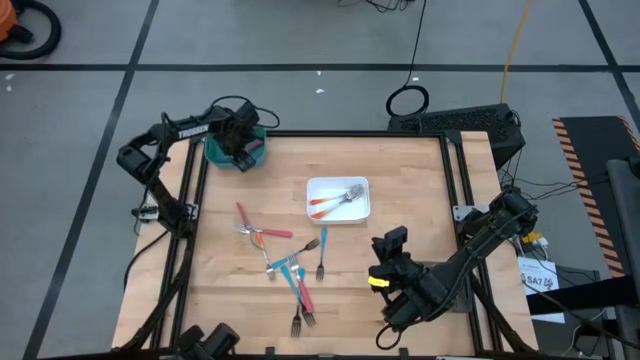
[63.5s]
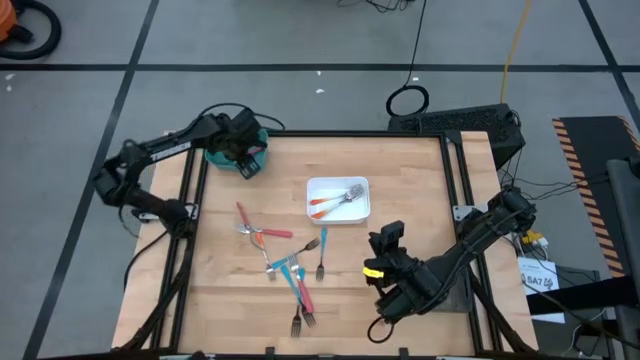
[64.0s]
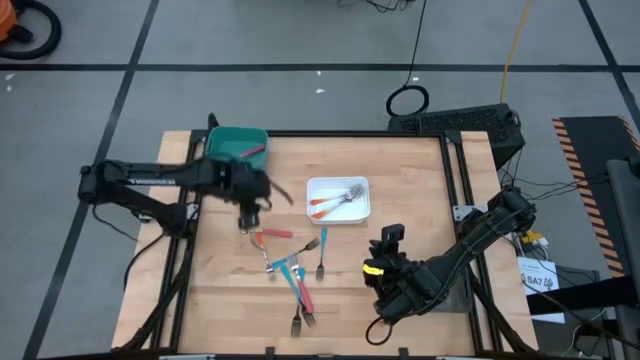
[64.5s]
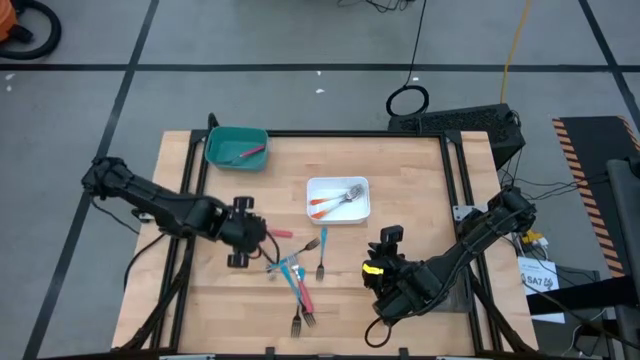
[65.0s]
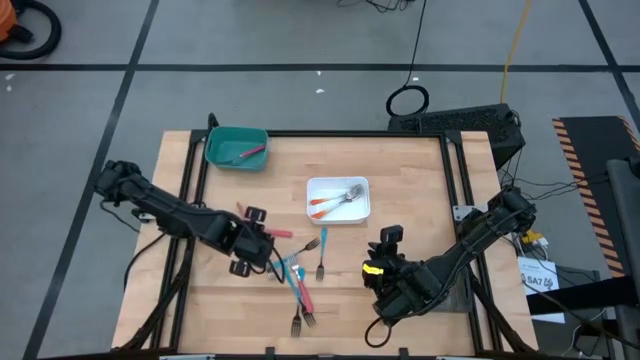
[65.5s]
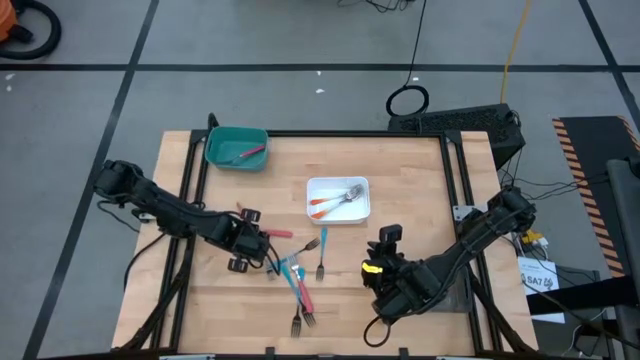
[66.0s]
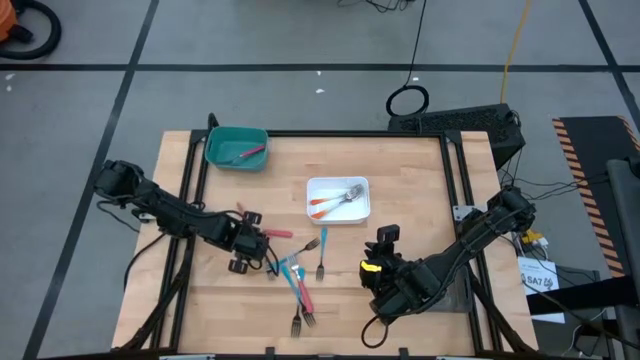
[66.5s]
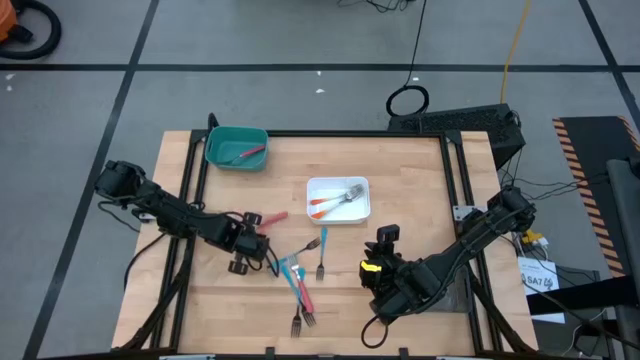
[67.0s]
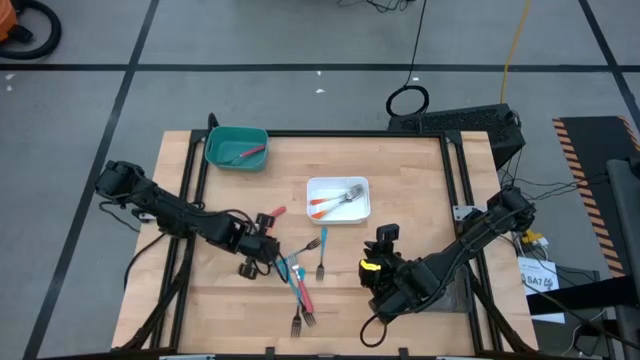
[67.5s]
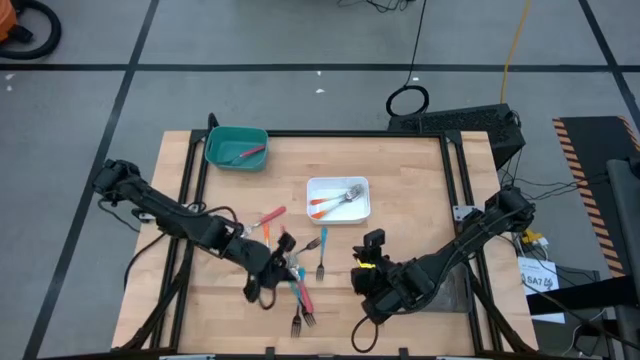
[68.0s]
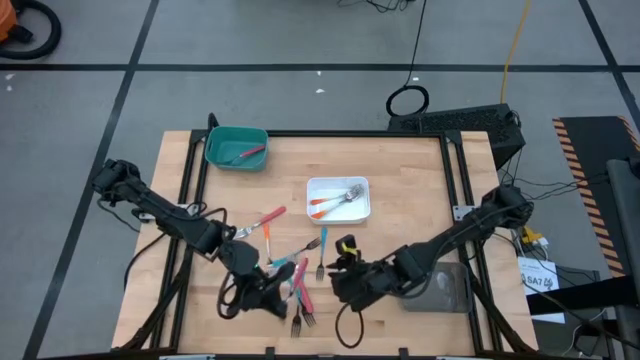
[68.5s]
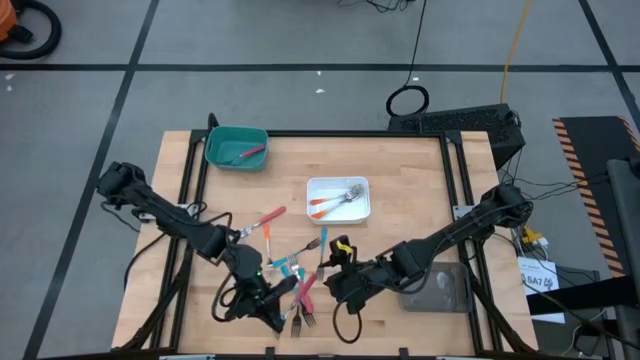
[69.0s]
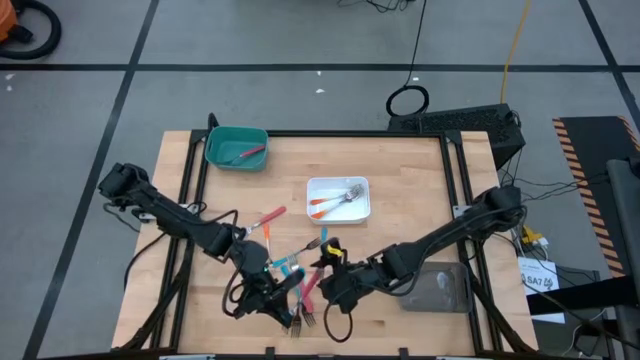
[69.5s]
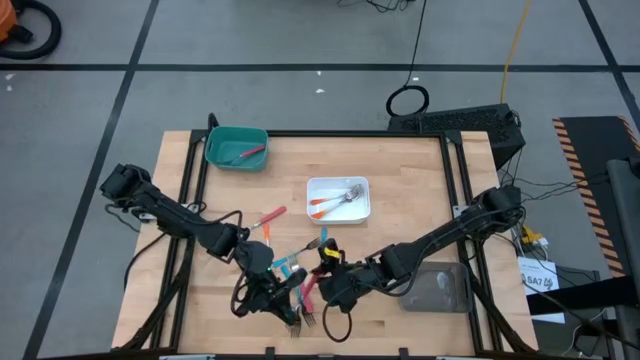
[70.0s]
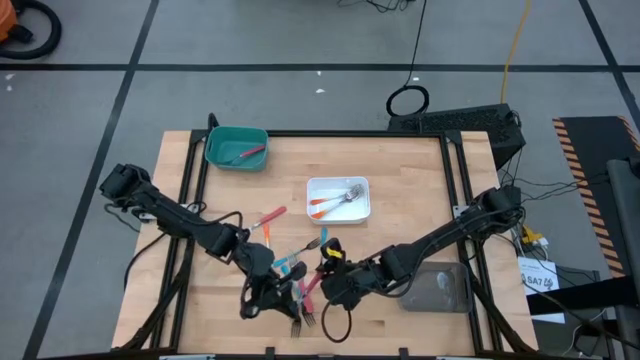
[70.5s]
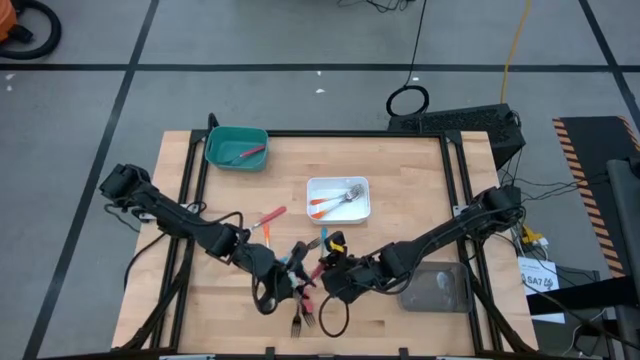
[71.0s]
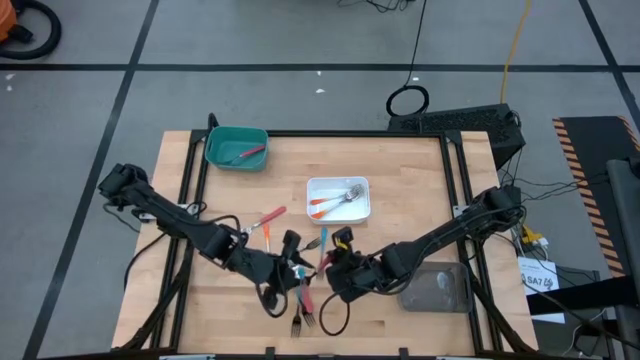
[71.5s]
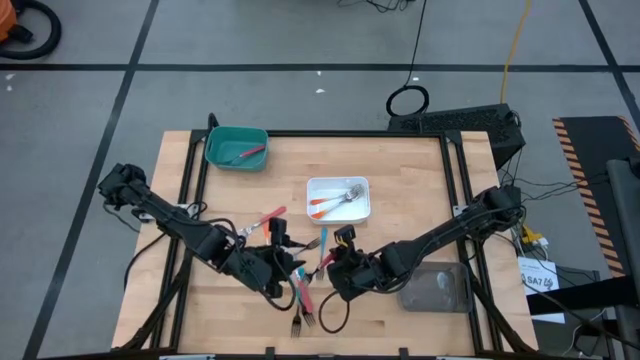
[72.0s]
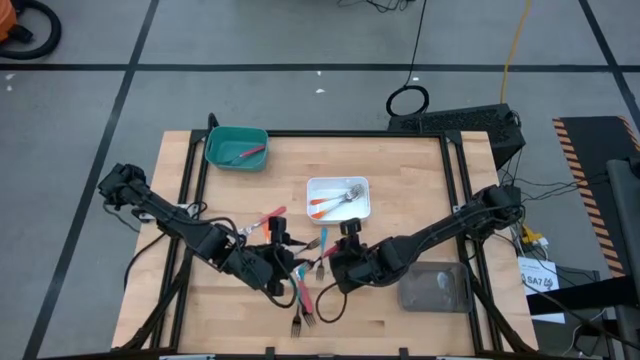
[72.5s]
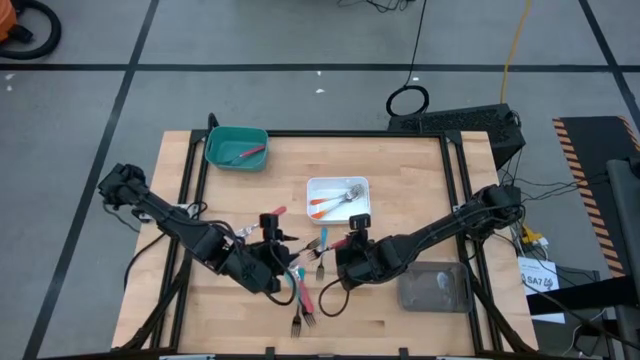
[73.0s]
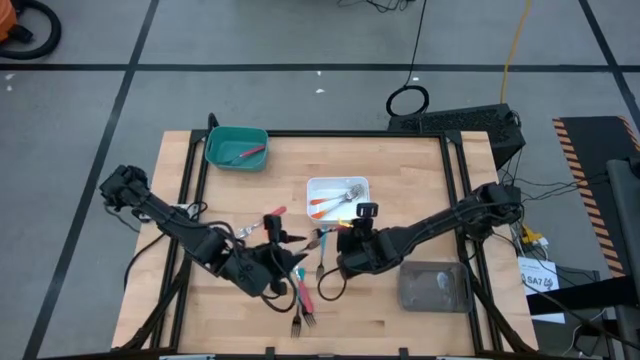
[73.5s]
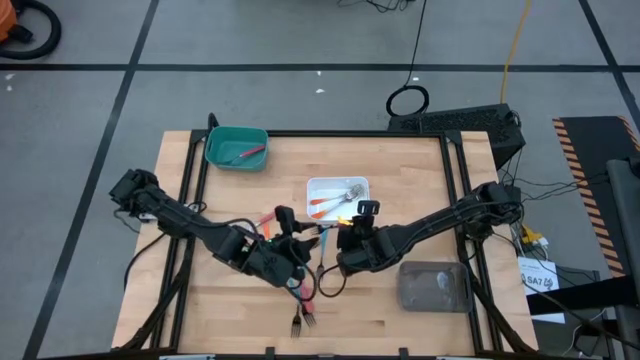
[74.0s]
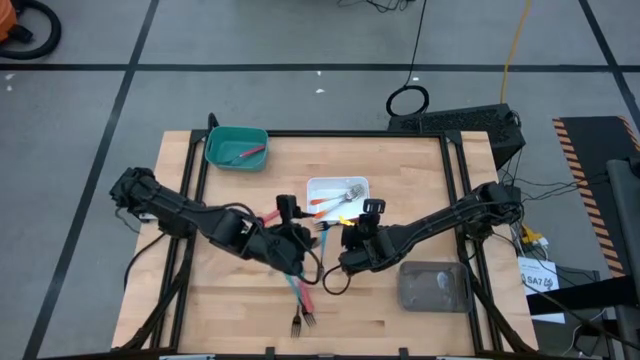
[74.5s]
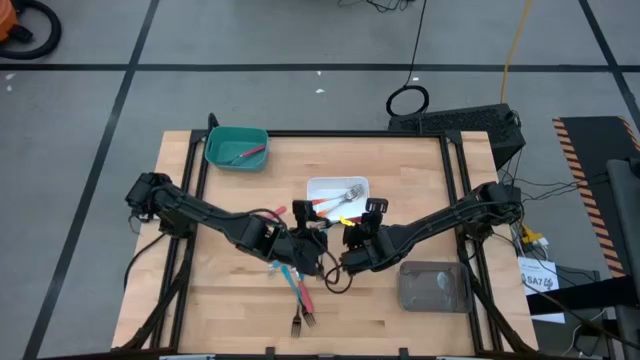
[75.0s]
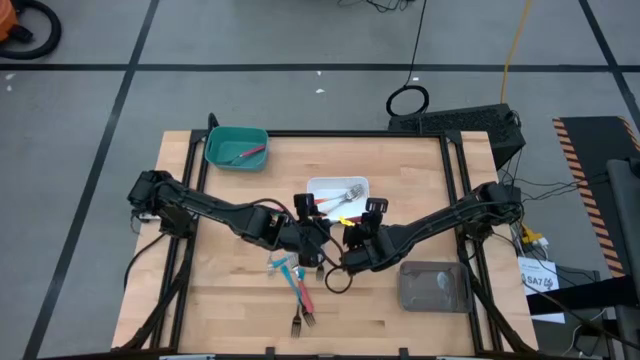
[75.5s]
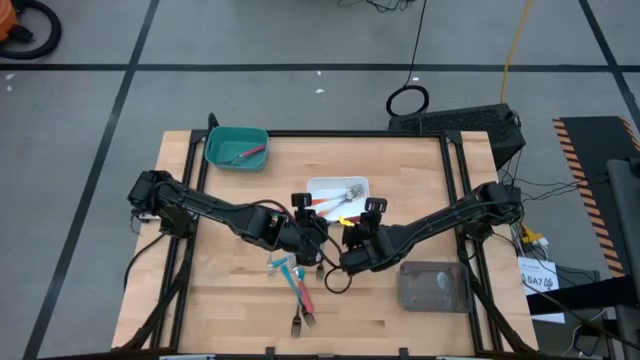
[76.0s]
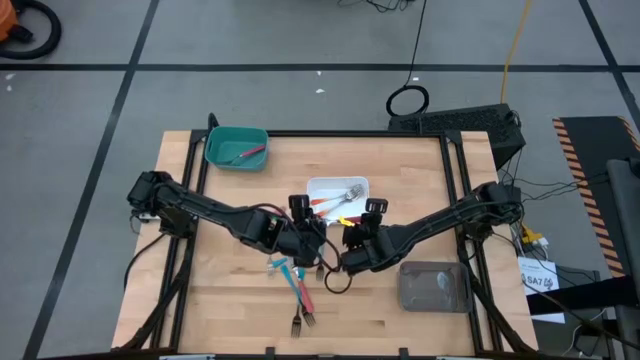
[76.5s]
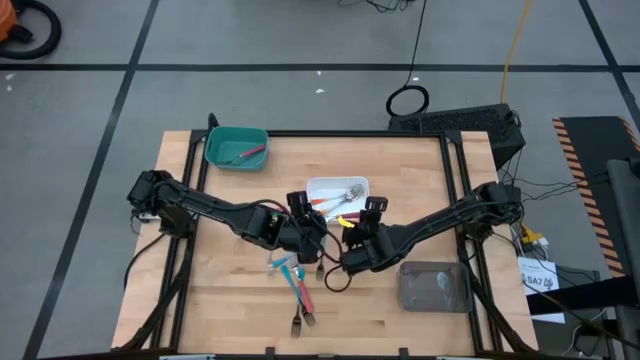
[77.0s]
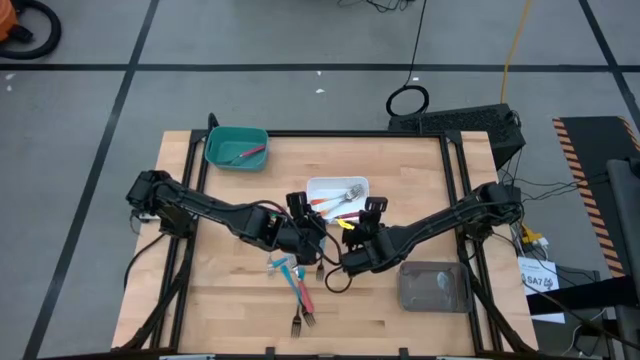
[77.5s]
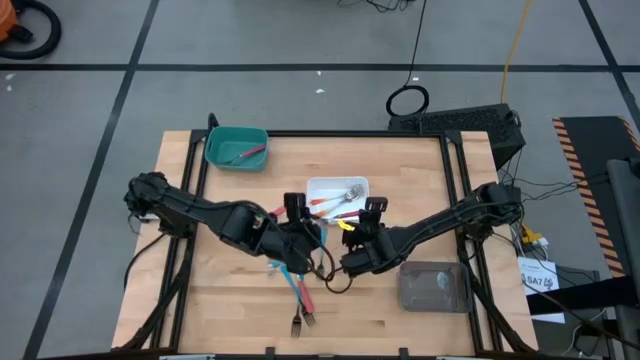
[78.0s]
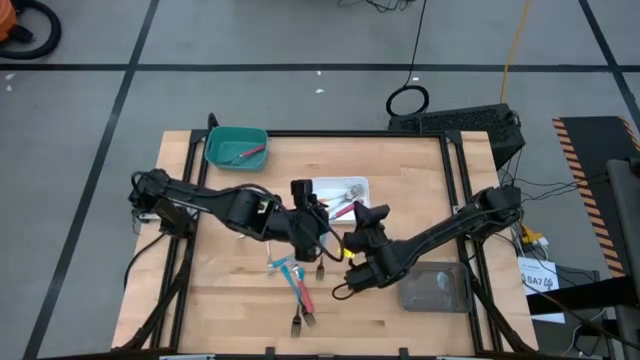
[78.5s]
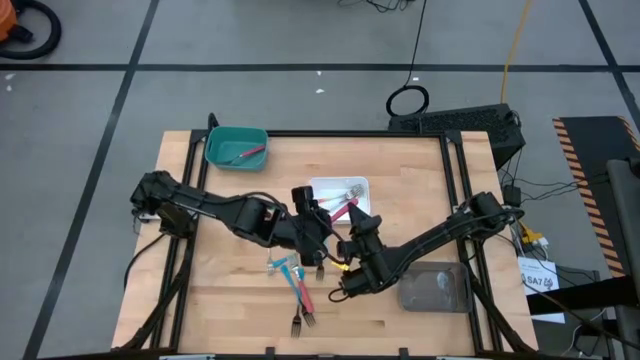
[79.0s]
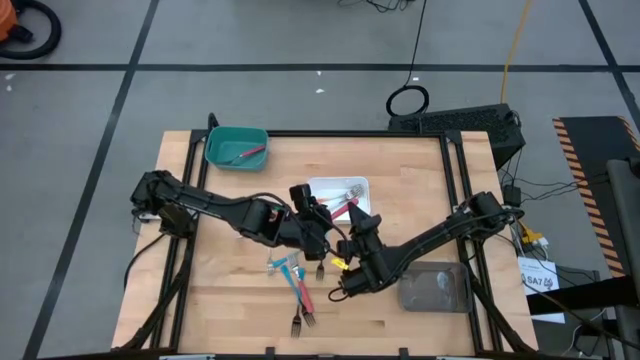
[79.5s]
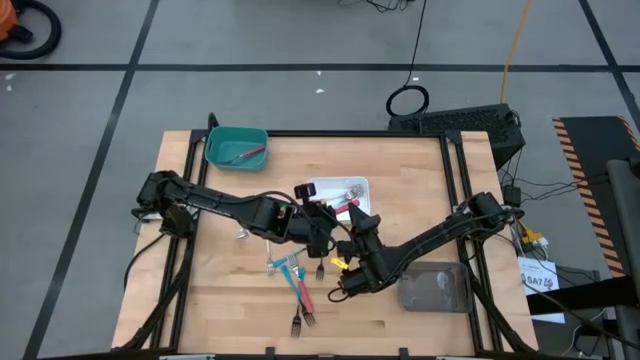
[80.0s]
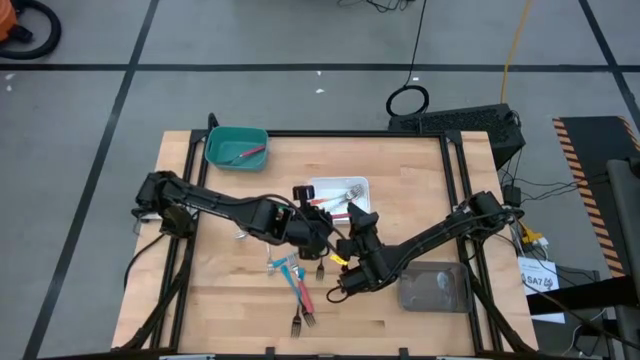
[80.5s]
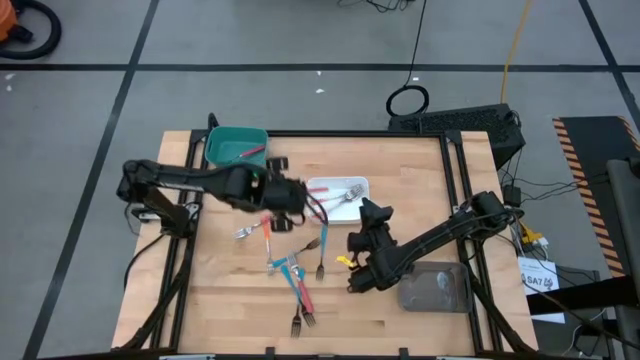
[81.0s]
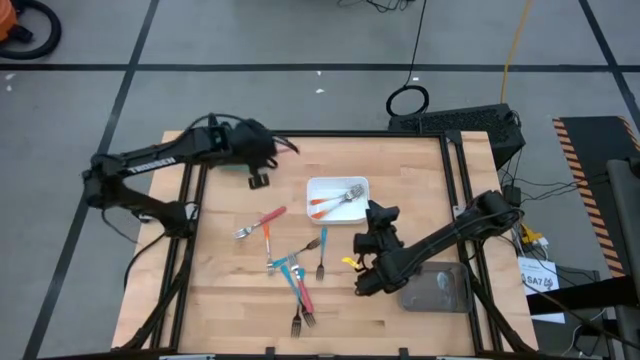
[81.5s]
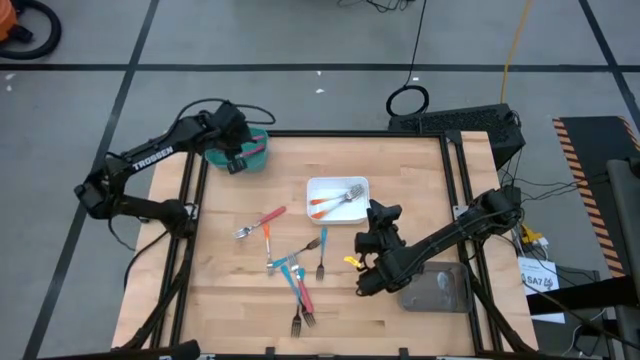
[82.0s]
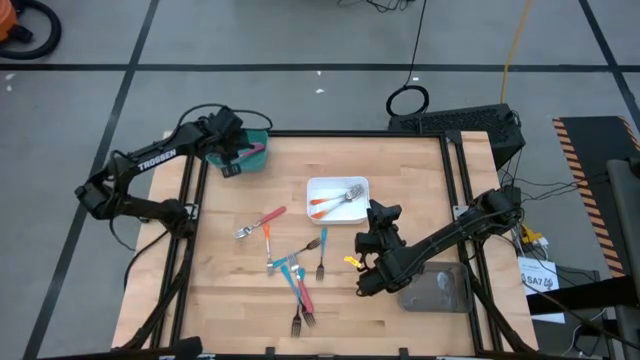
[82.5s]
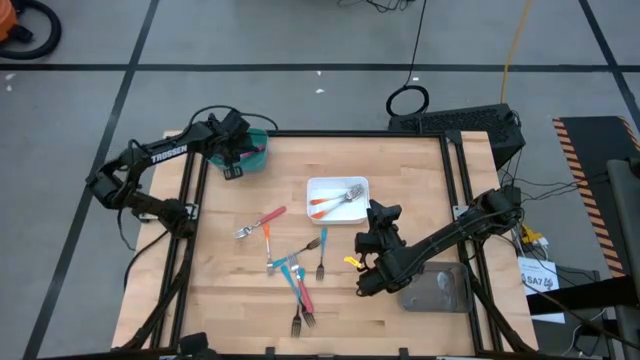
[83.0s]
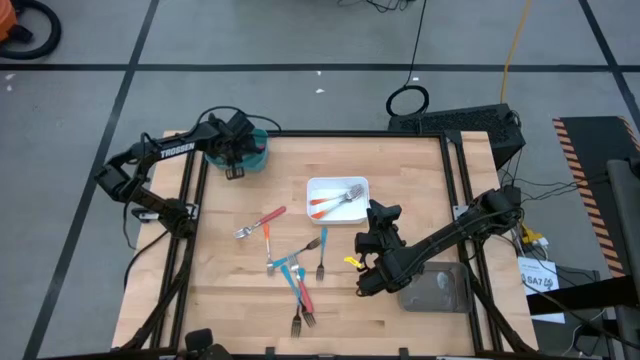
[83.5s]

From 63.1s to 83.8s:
Task: Sort silverware by color (type)
Put the pink fork into the blue bin

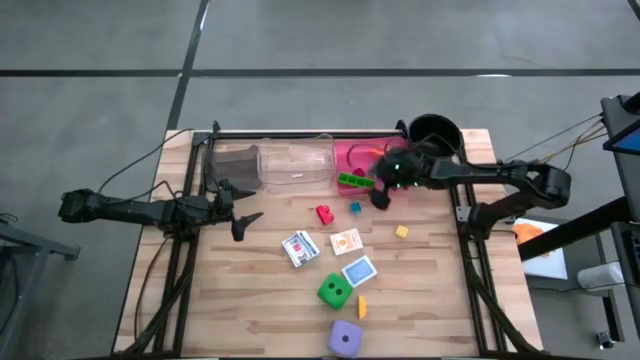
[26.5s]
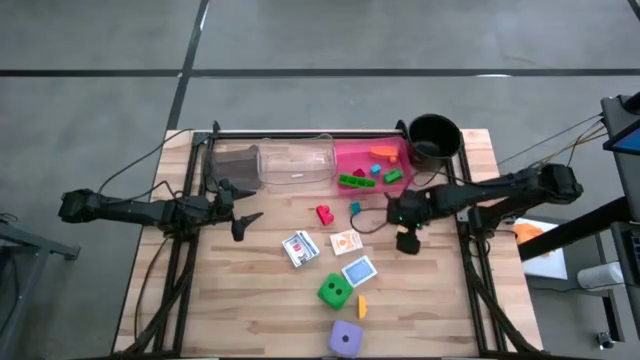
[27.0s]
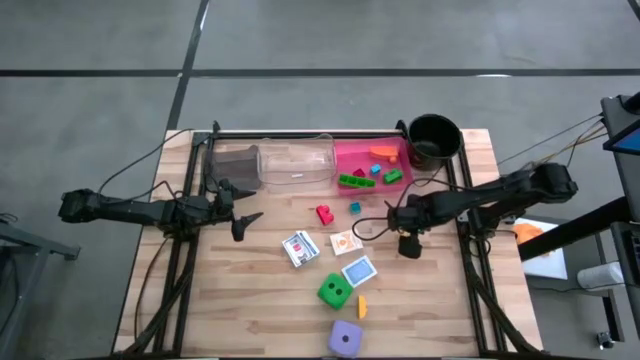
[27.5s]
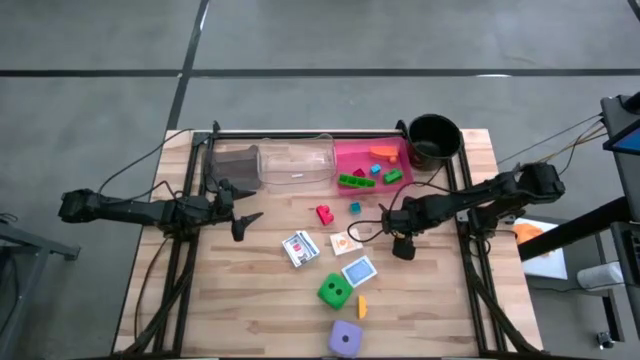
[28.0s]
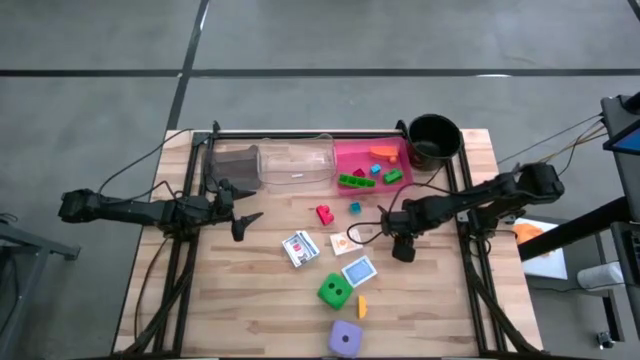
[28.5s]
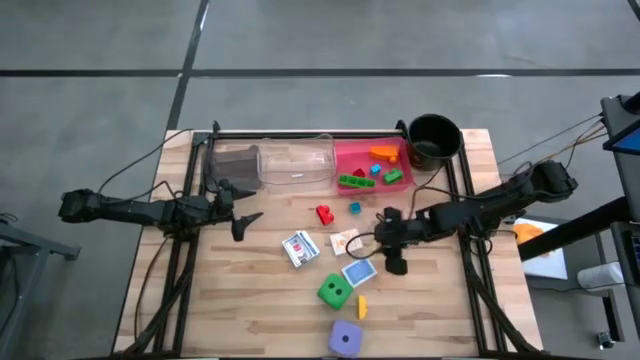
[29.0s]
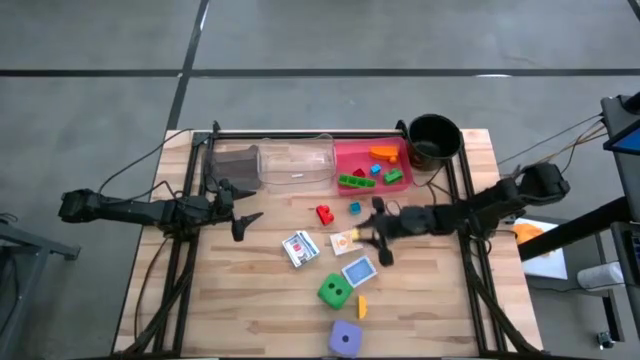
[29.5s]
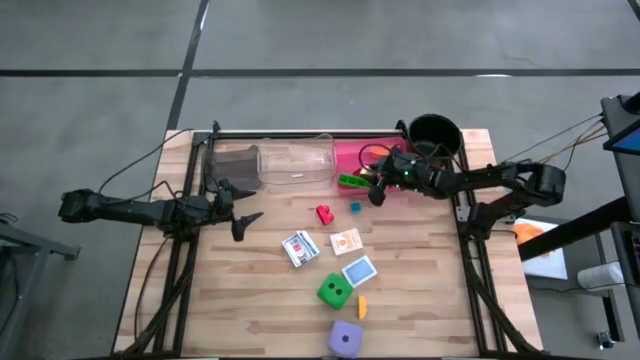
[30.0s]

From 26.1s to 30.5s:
Task: Pick & Place Toys
Put the yellow game piece into the pink bin
